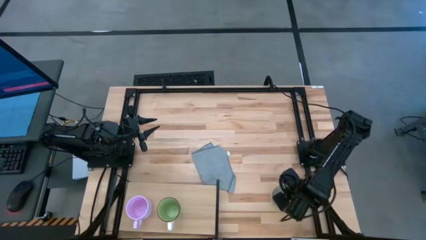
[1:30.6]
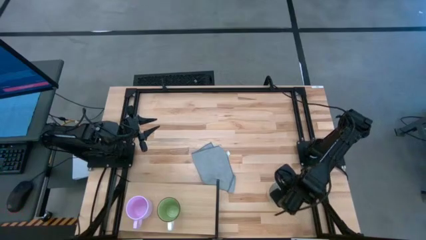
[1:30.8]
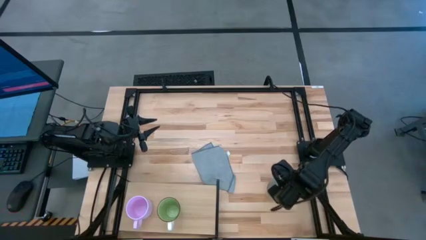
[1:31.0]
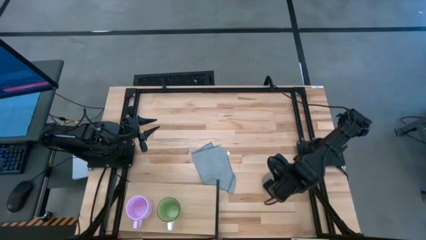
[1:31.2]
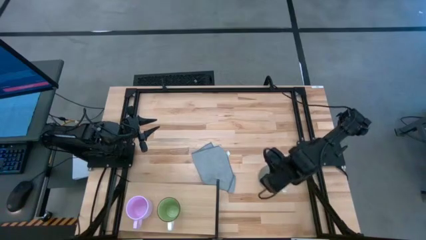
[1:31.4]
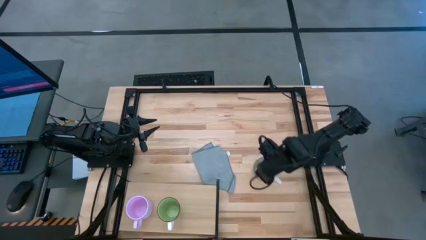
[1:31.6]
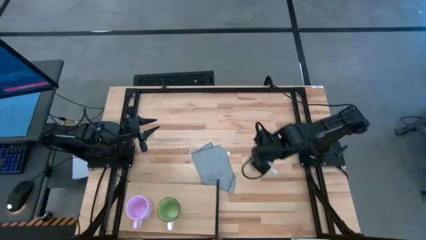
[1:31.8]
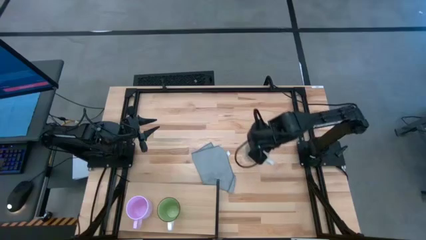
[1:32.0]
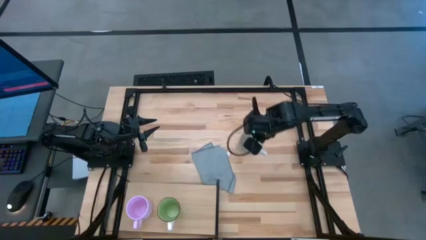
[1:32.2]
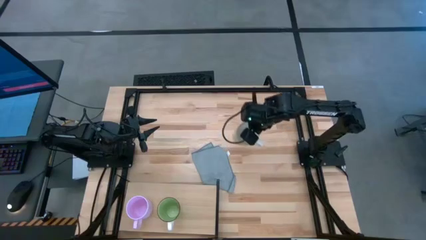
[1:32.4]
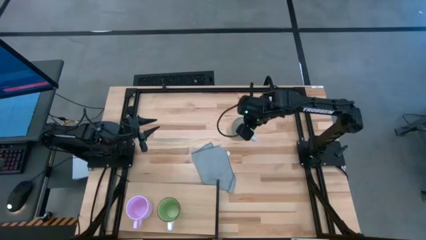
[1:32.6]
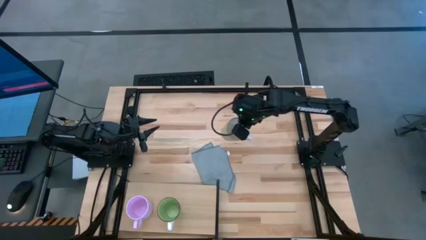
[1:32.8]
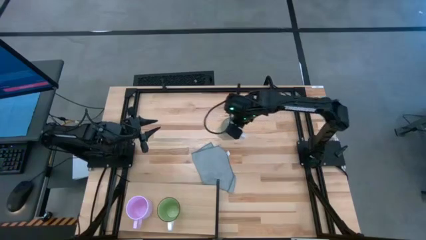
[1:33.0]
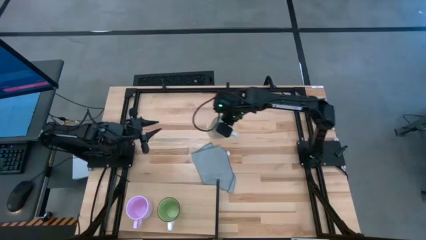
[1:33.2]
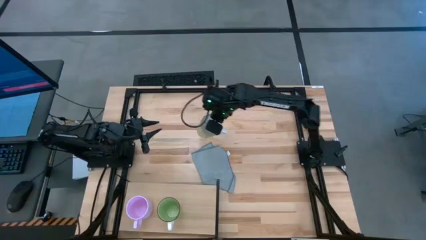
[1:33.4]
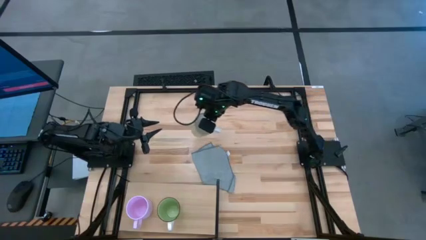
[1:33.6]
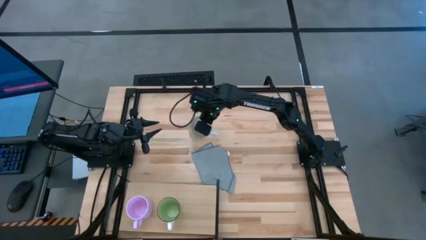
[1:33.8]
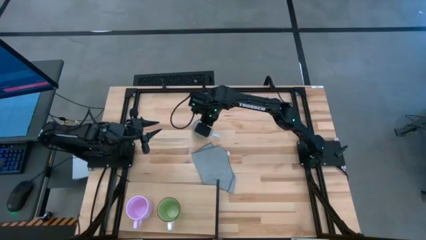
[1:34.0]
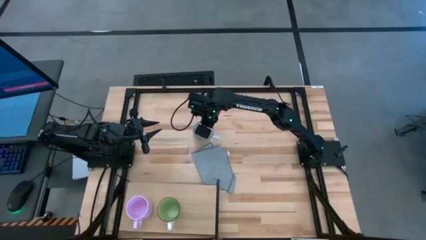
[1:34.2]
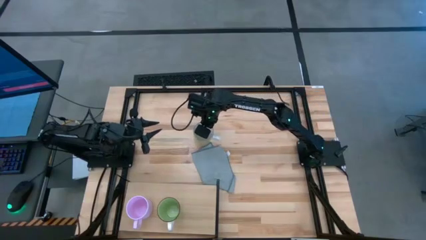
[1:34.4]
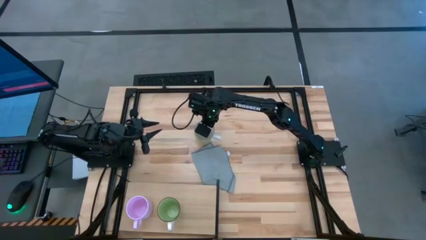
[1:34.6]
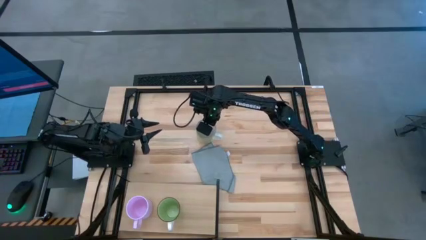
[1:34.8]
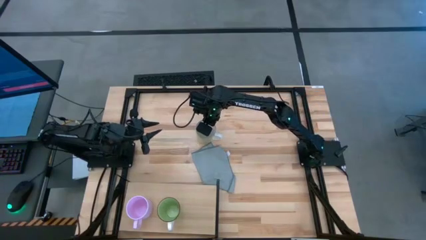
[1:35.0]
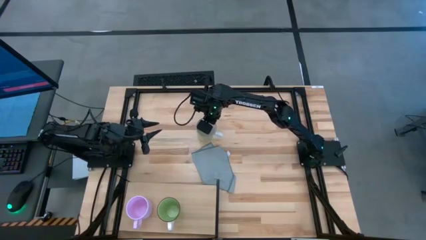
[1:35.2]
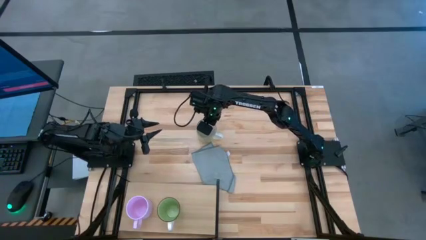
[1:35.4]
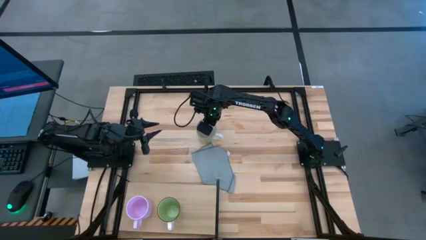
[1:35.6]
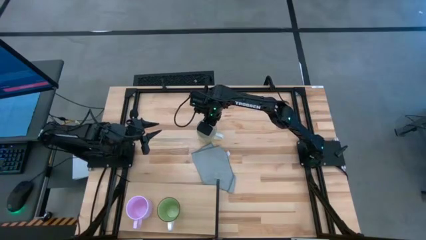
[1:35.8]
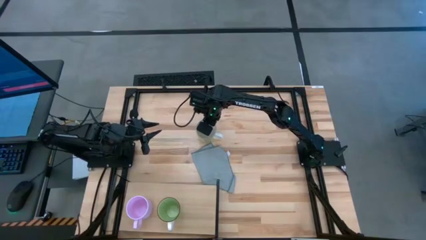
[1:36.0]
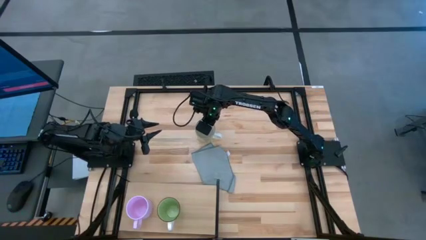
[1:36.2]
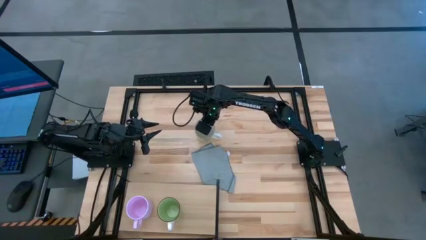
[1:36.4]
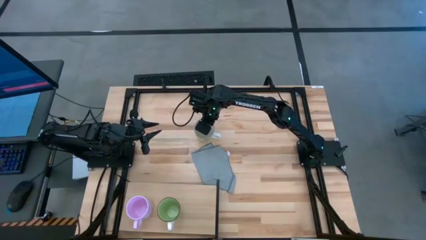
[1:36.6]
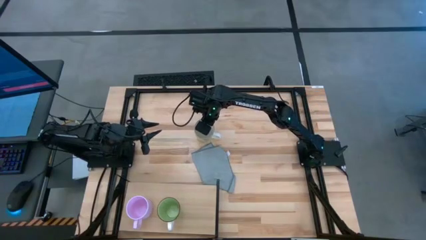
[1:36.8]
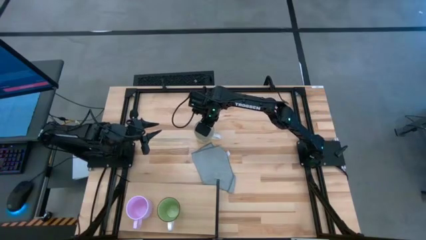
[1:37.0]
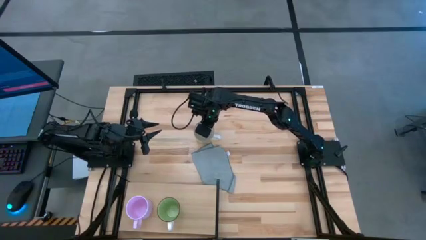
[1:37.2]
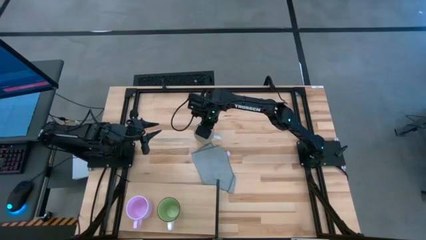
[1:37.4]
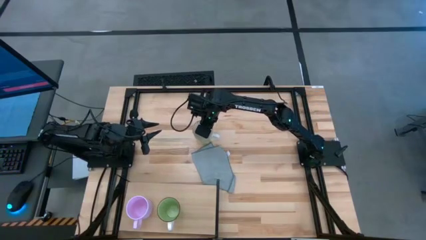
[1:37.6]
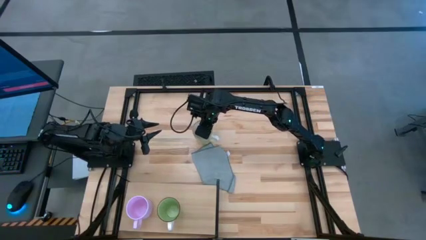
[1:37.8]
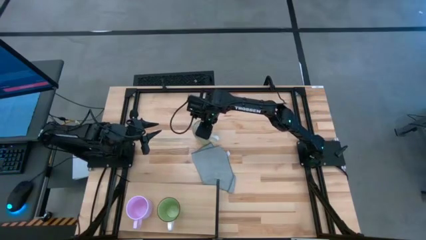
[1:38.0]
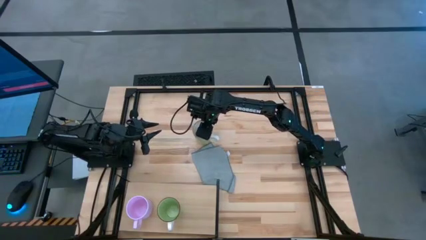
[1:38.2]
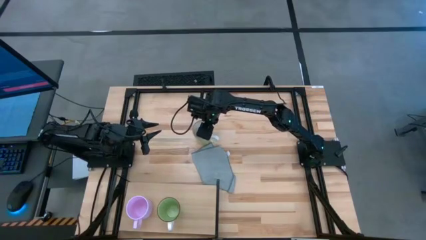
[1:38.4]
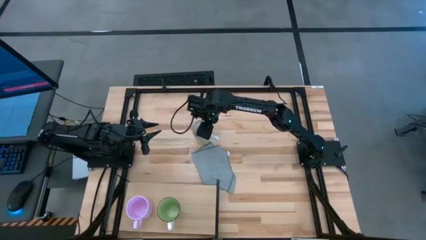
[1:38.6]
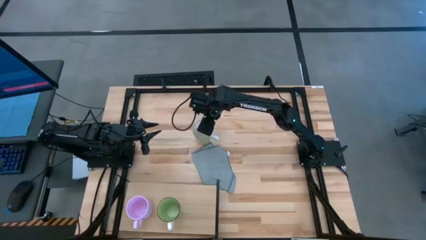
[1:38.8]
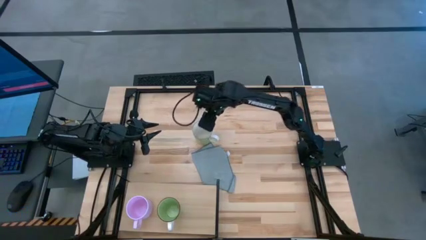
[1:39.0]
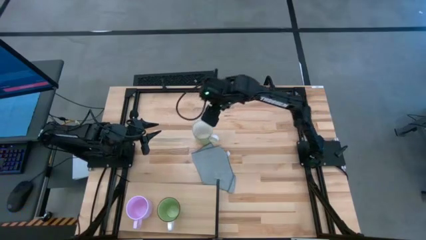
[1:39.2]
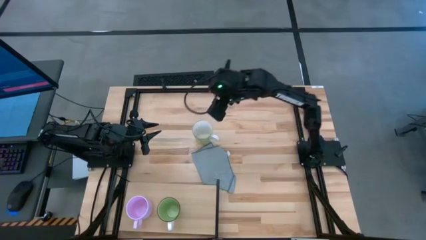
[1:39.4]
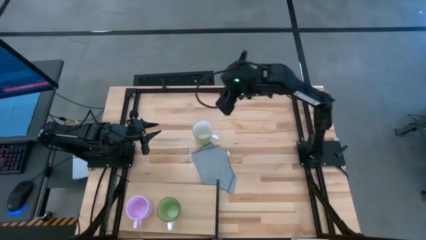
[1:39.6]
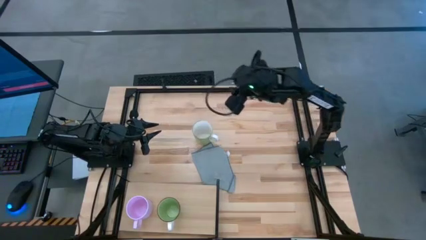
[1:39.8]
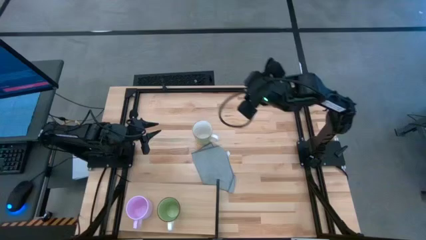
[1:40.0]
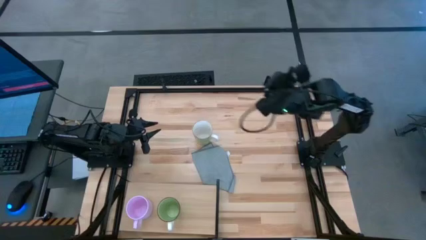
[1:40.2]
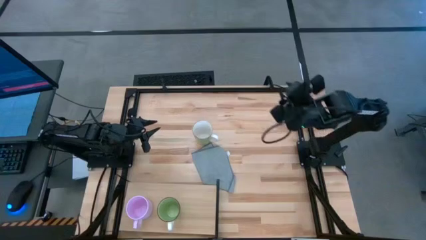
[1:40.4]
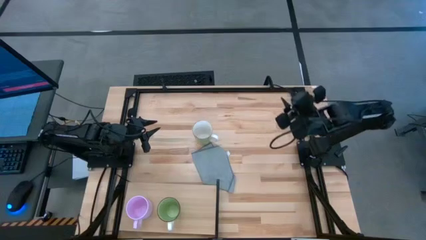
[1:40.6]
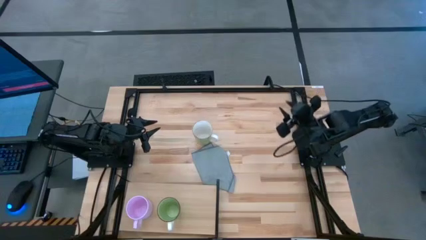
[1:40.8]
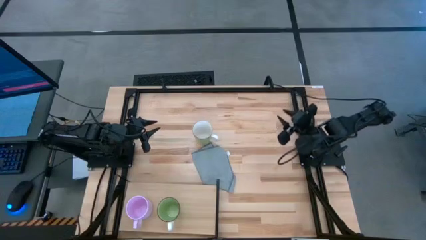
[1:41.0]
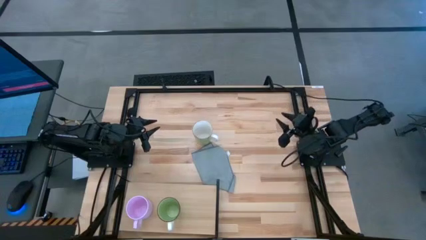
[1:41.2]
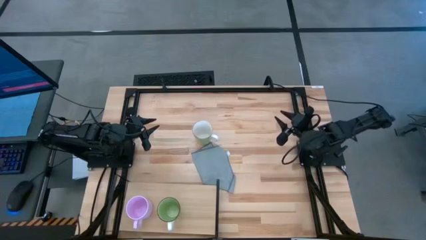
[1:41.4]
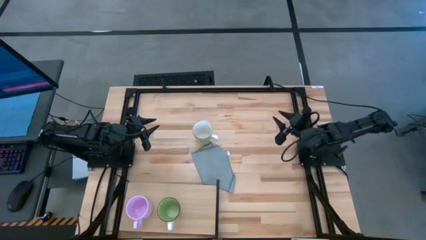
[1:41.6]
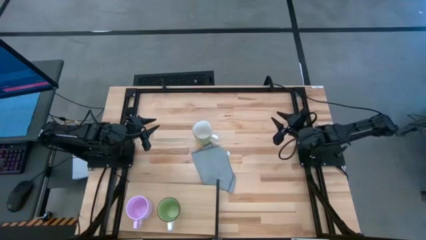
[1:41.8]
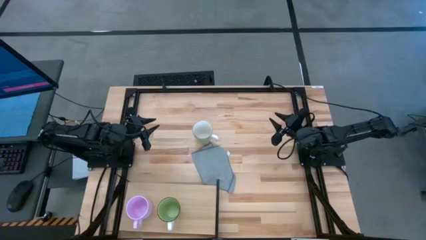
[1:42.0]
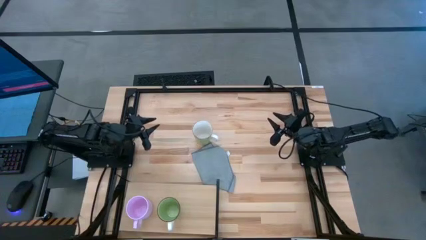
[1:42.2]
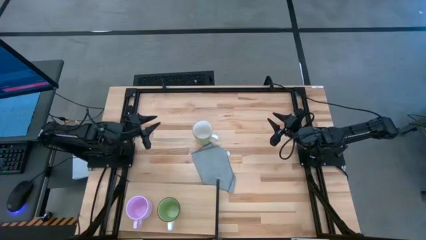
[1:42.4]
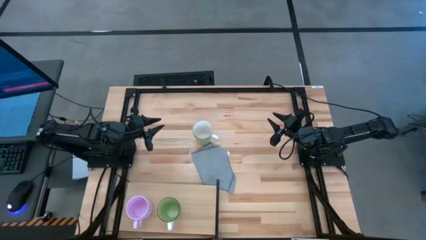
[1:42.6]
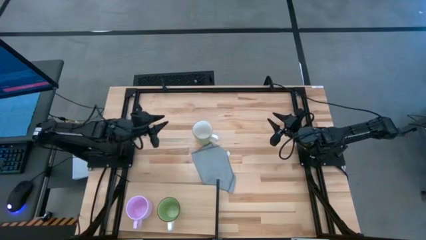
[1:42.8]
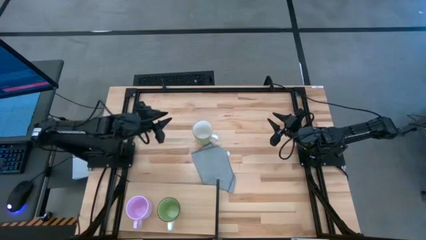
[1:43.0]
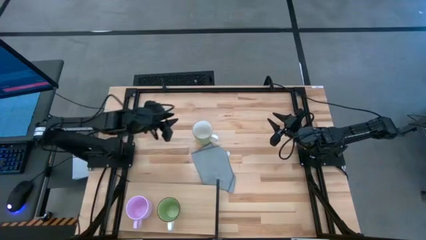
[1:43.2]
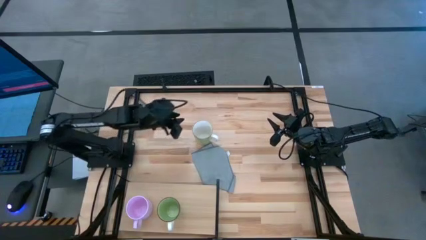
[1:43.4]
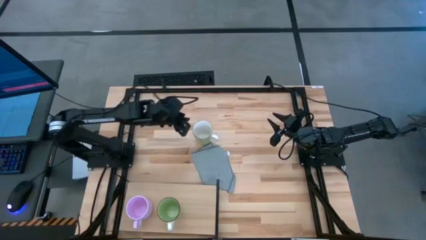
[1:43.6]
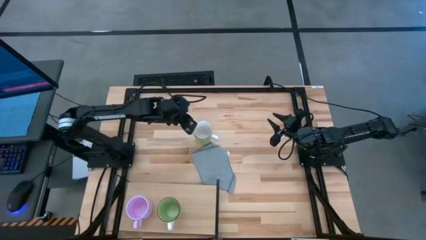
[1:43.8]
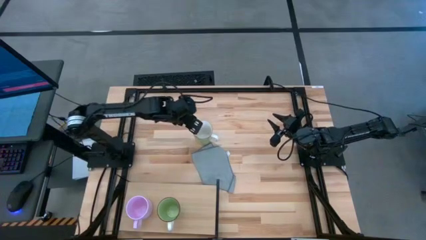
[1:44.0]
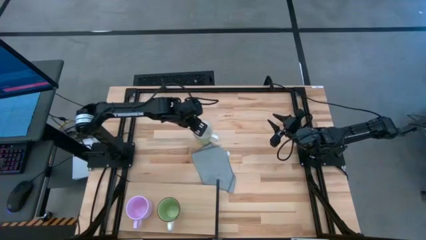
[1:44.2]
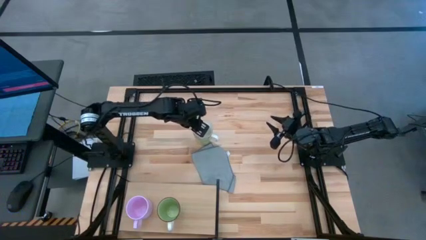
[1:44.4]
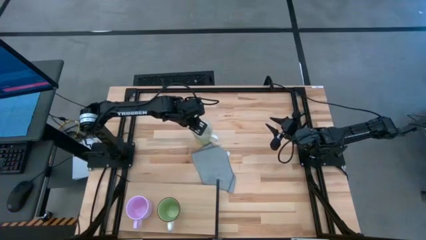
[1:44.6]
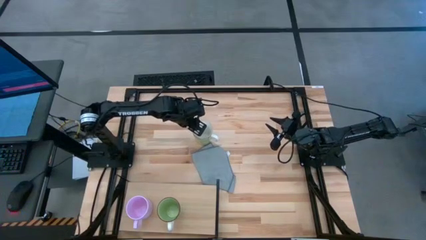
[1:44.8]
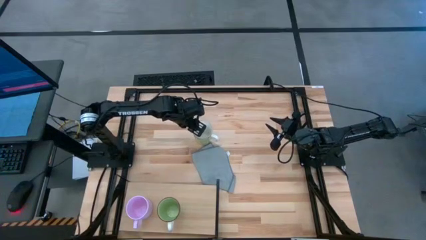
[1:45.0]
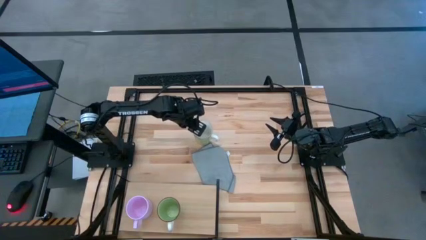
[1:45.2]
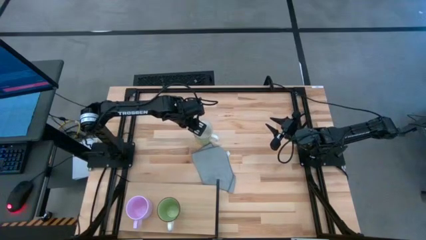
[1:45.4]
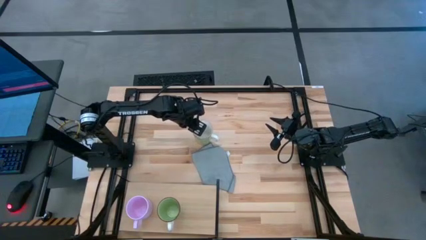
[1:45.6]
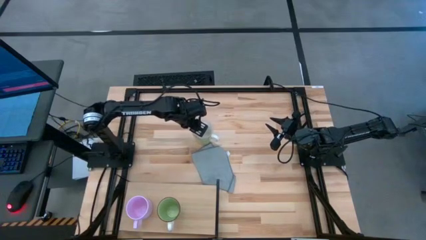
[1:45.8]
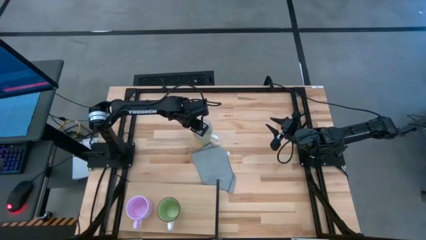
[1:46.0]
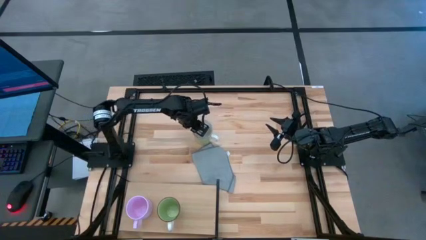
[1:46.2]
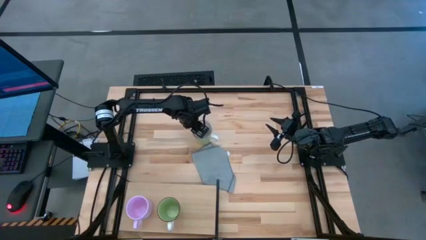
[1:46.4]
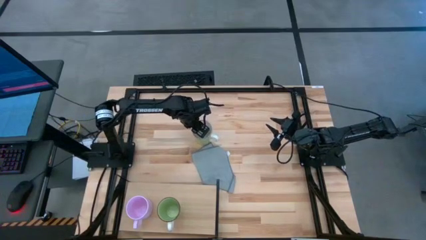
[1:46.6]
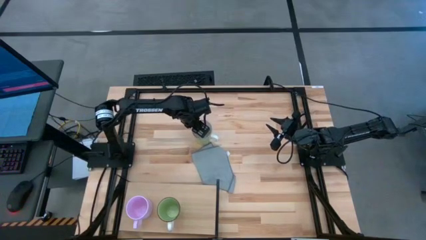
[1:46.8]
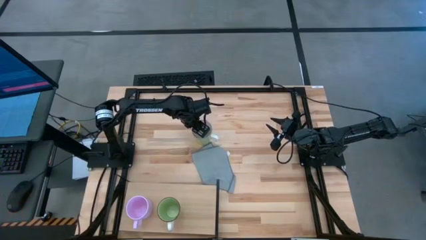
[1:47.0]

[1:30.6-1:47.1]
Task: Stack small to large cups/mugs on shelf
Put the white mug onto the shelf
